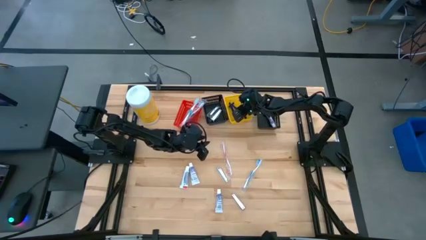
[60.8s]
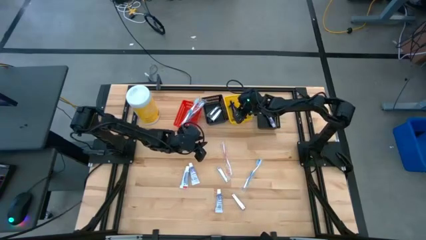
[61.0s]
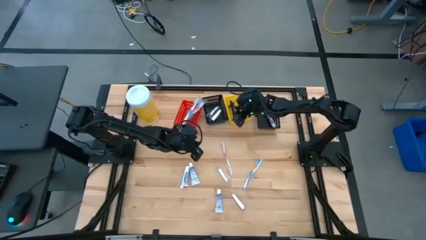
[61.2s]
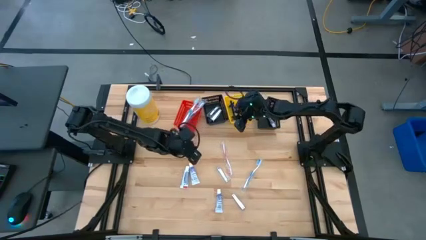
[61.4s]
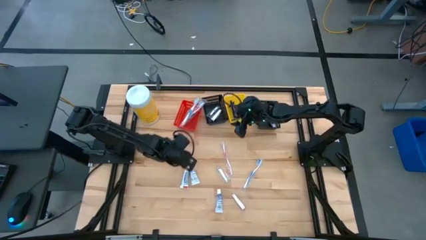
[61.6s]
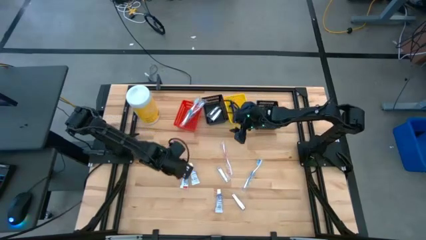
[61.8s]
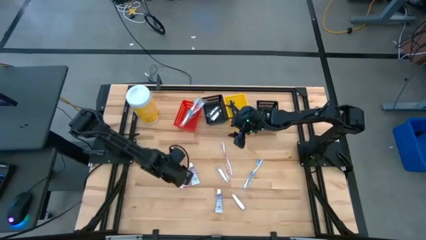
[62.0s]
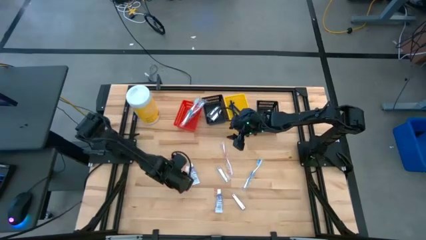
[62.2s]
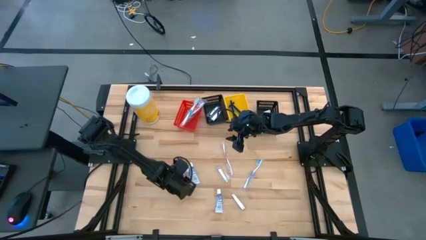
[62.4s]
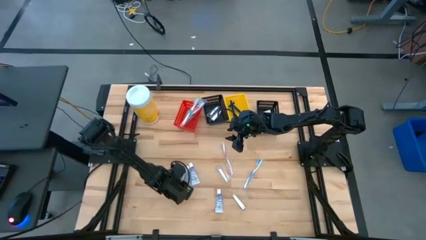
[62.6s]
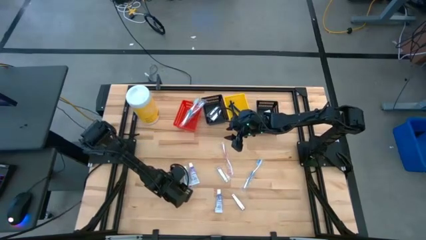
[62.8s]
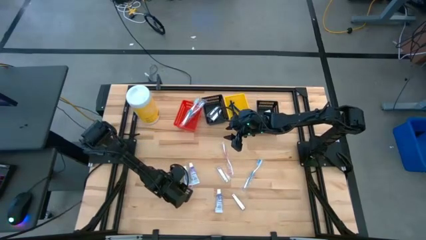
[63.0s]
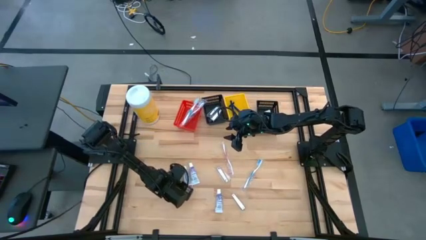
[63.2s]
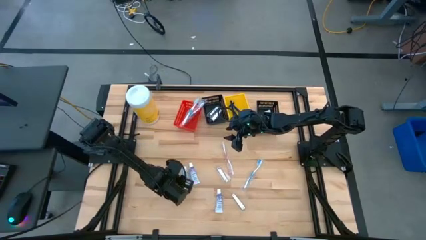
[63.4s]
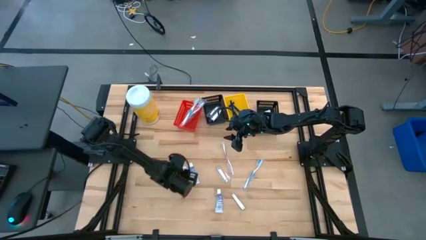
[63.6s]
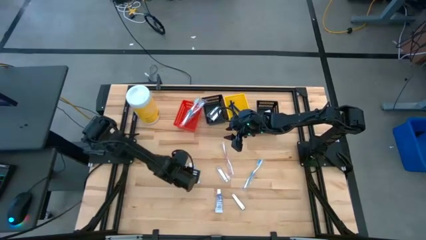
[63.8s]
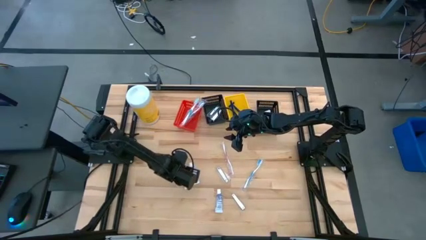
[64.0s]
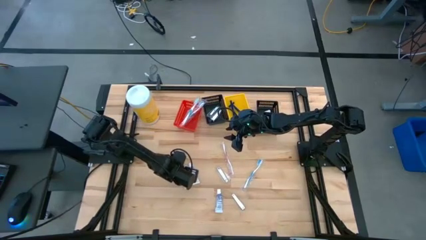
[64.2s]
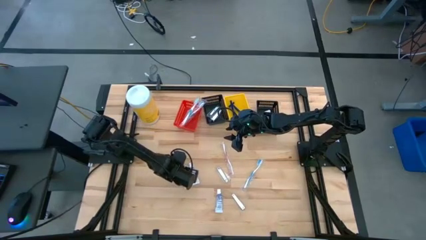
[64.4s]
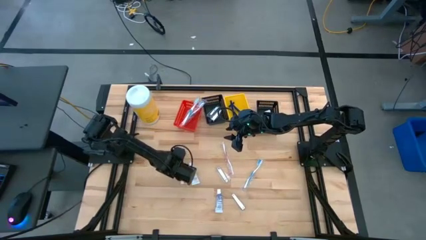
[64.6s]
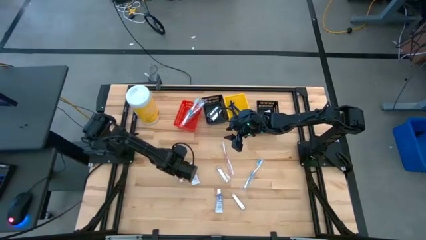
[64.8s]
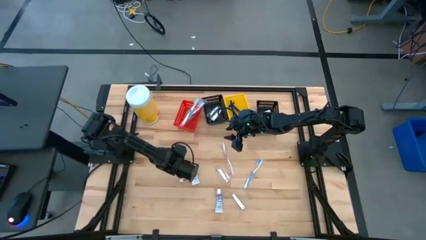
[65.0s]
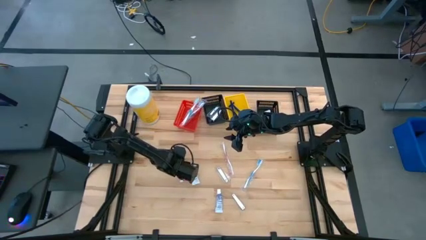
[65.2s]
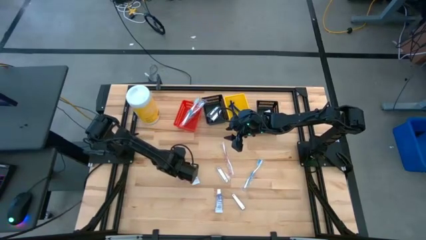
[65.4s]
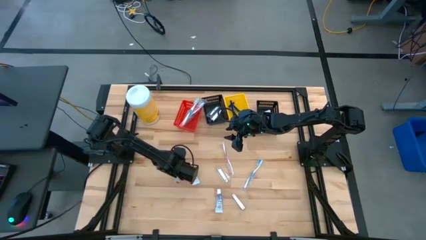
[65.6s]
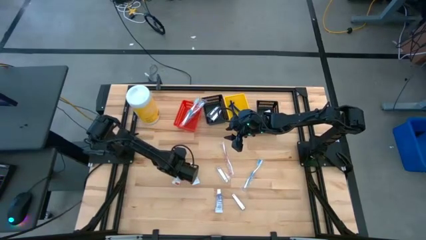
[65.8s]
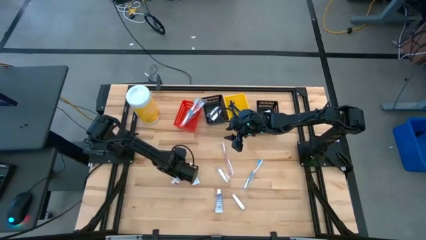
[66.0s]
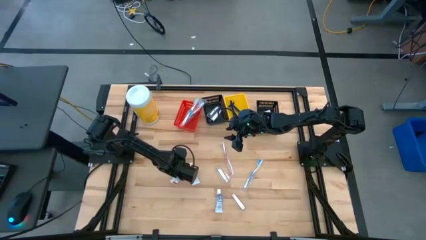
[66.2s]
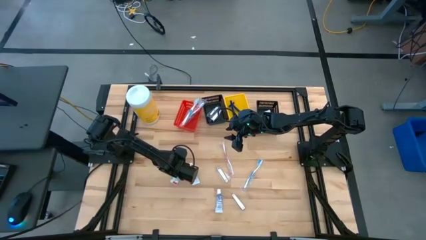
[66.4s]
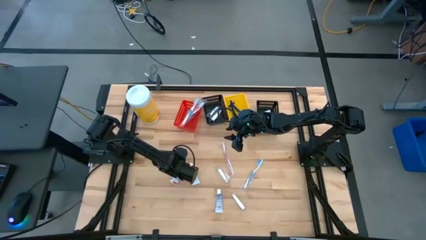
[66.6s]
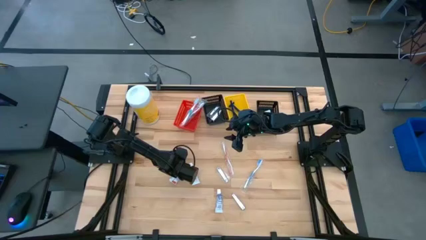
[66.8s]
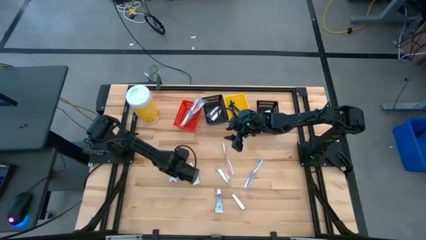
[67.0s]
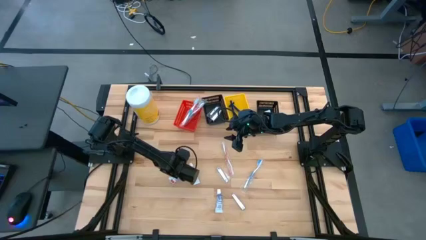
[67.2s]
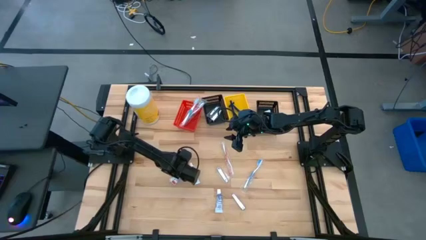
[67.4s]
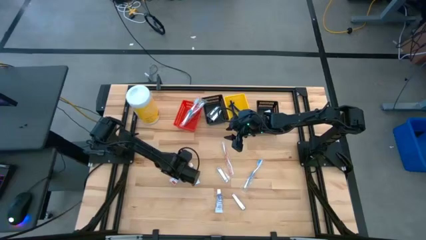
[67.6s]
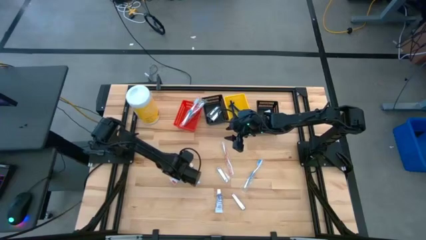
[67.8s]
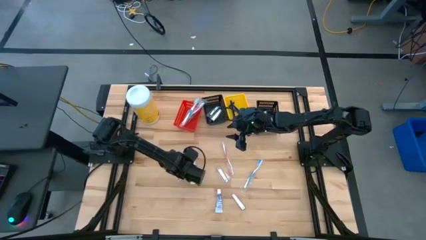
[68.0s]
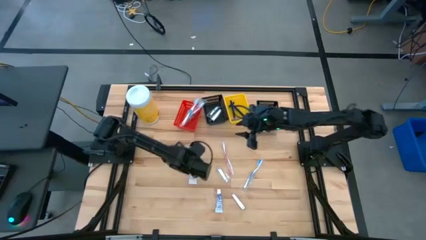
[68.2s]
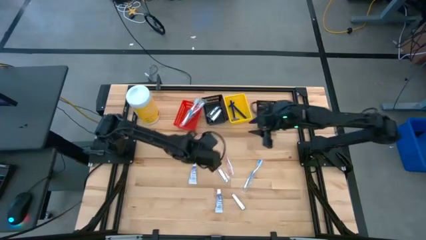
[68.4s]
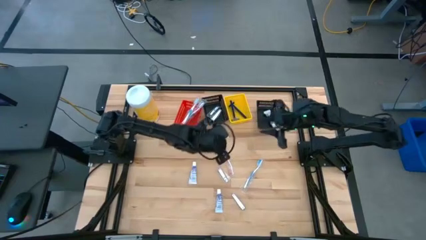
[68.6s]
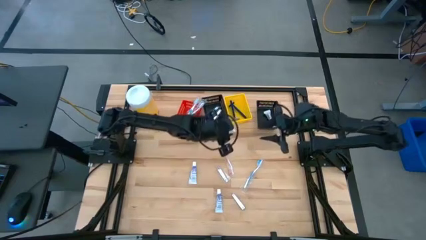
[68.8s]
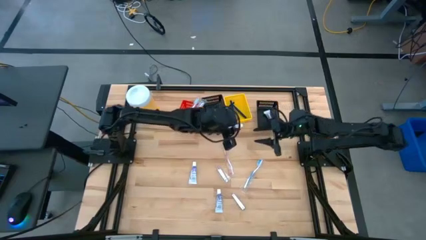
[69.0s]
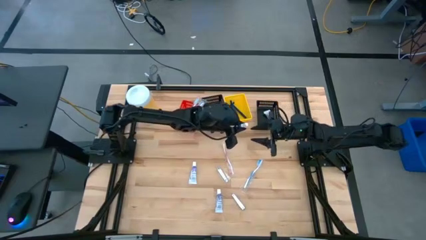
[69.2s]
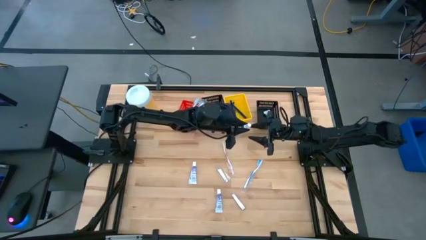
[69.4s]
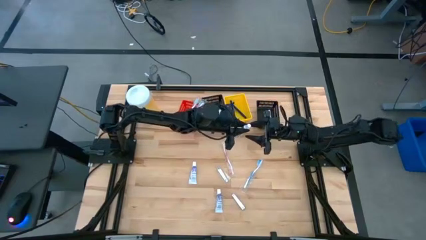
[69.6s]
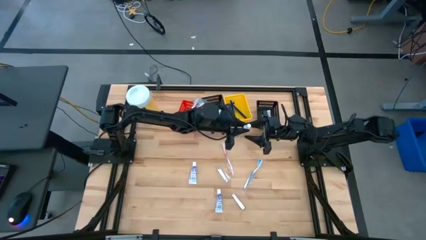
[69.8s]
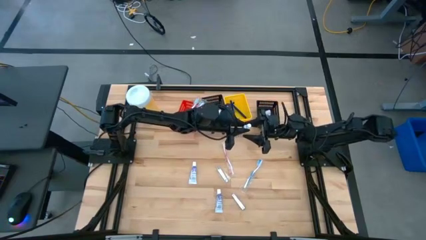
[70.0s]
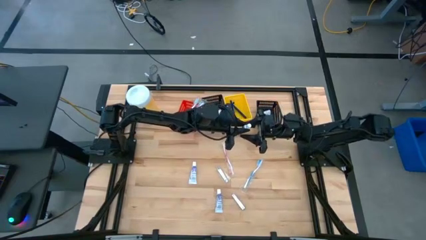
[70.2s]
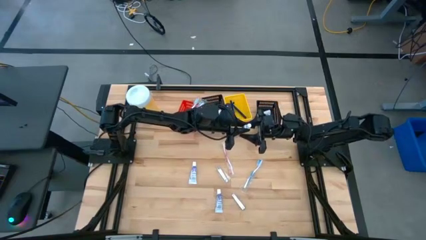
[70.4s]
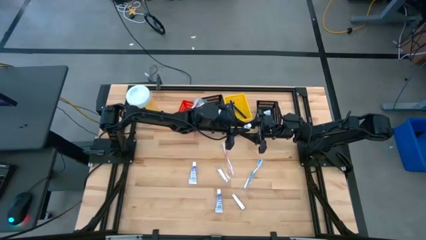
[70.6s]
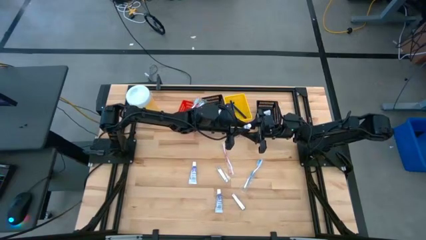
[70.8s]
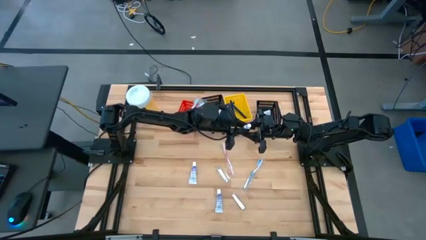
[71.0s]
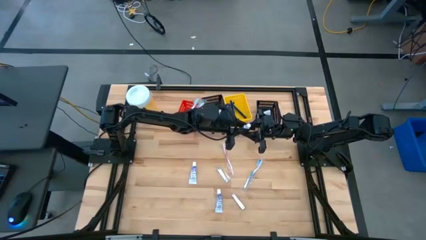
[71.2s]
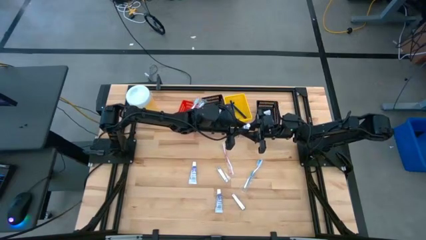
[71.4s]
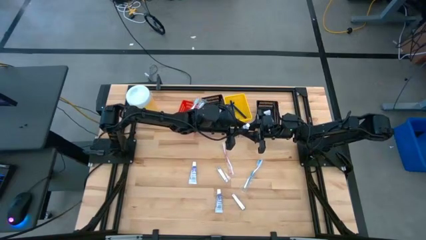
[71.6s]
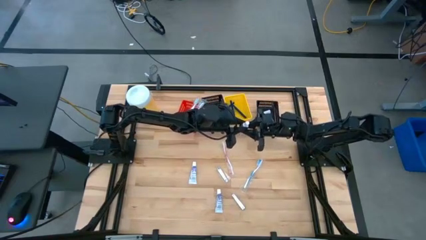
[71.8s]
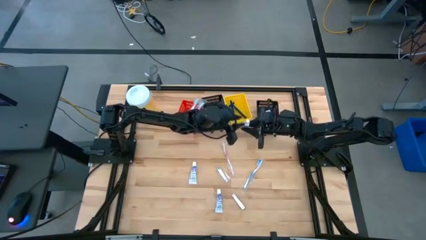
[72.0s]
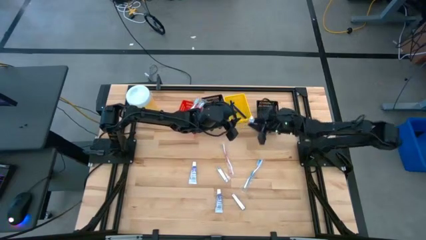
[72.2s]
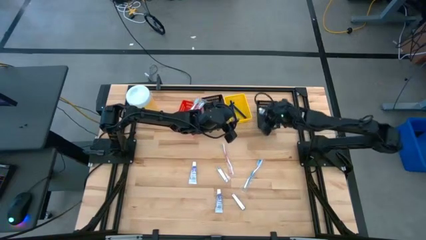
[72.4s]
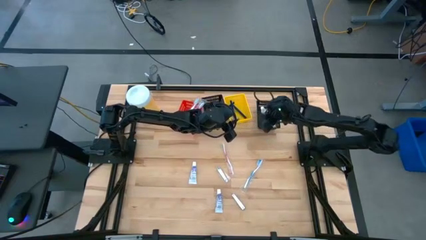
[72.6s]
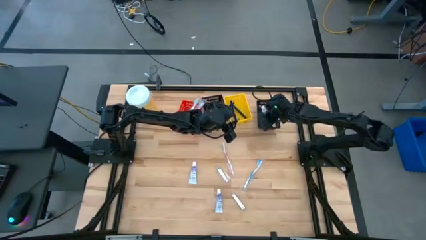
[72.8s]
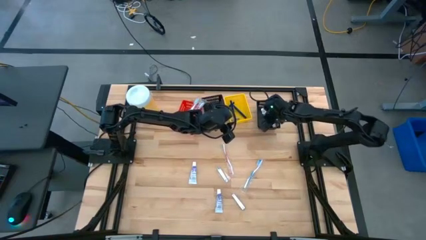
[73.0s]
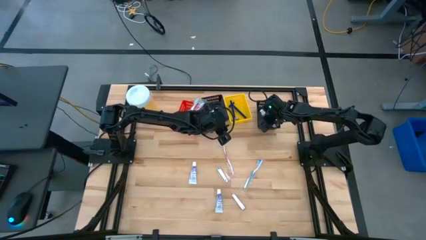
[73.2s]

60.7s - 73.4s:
Task: Pick & Place Travel size toiletries
Put the purple toothpaste into the right black bin
